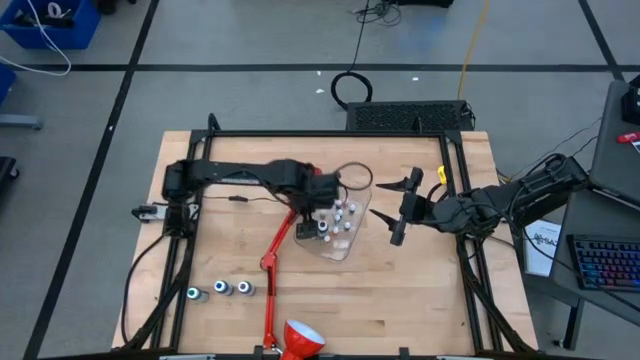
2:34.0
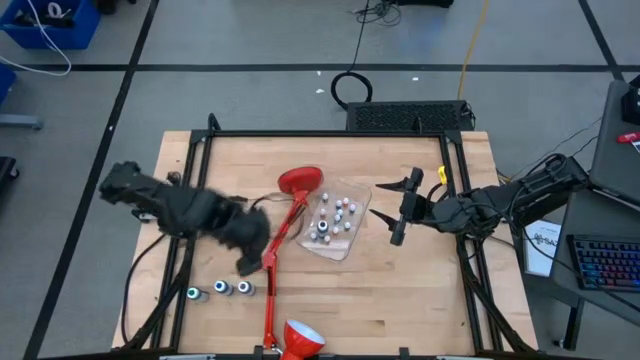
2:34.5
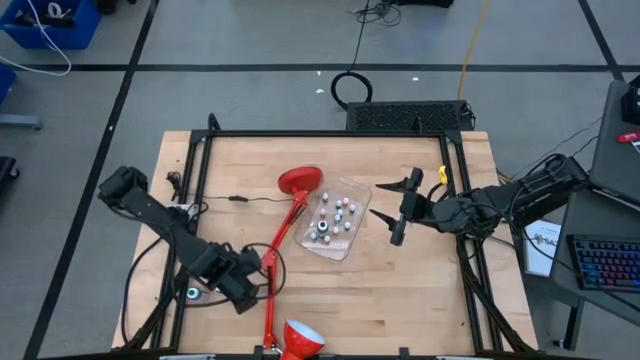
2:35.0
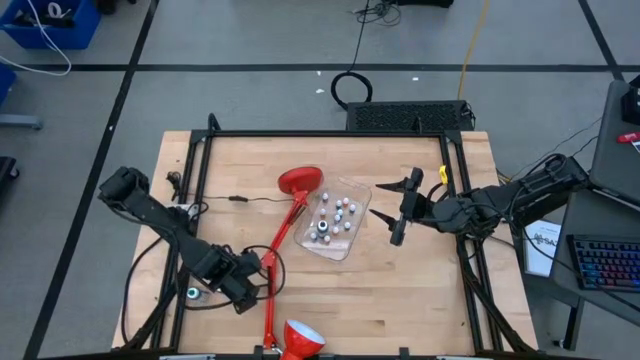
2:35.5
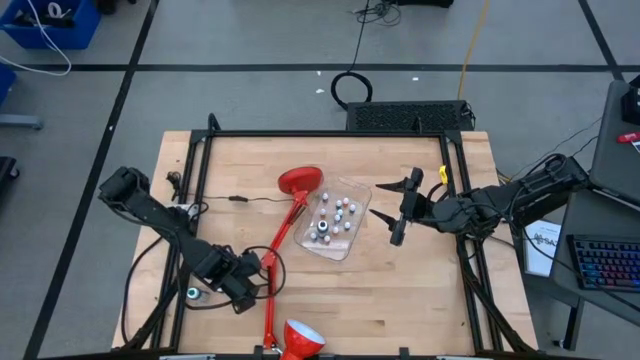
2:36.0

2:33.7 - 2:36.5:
Task: Pick & Place food coloring
Put the large purple food coloring bottle into the transparent bin

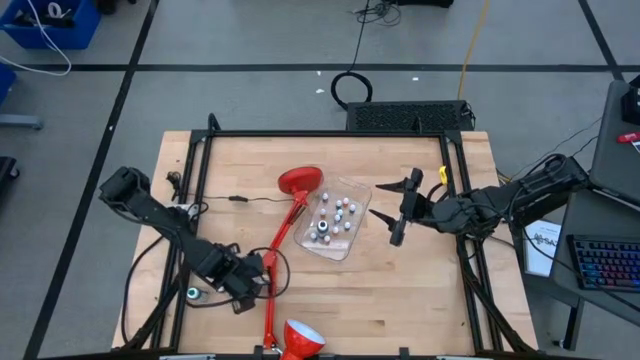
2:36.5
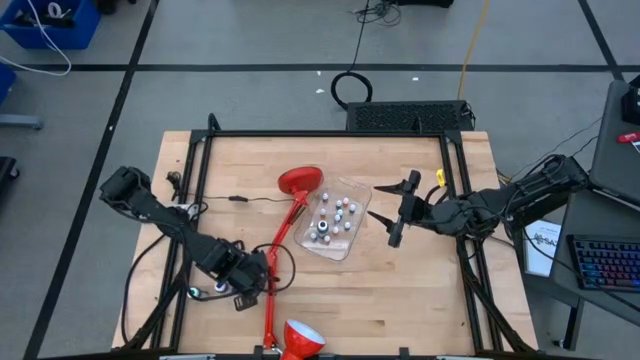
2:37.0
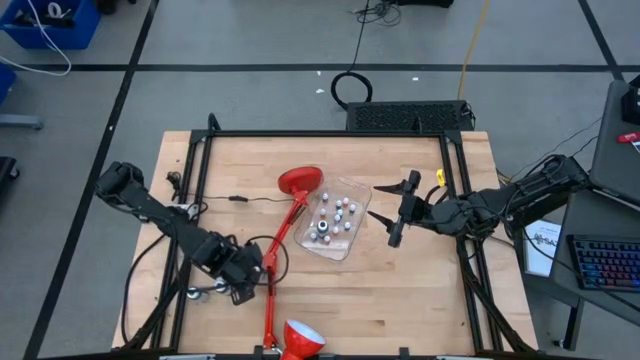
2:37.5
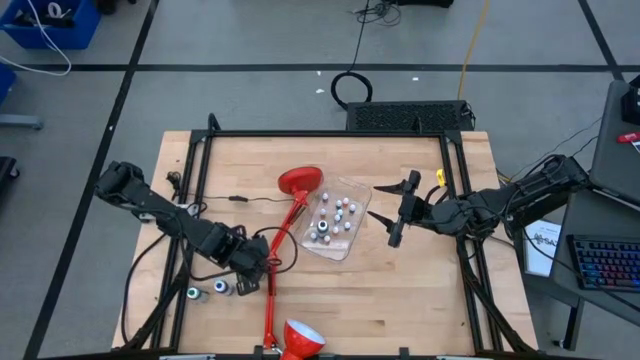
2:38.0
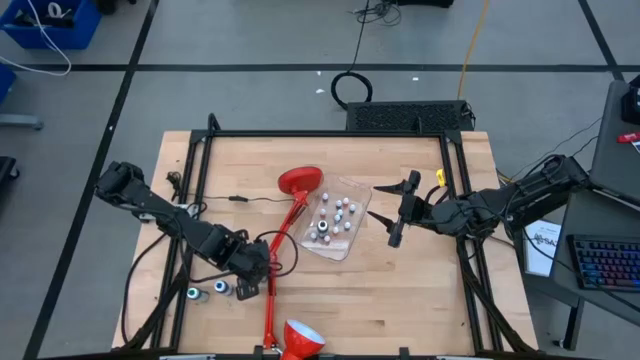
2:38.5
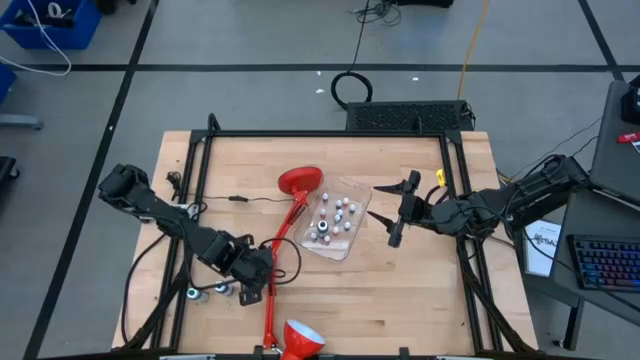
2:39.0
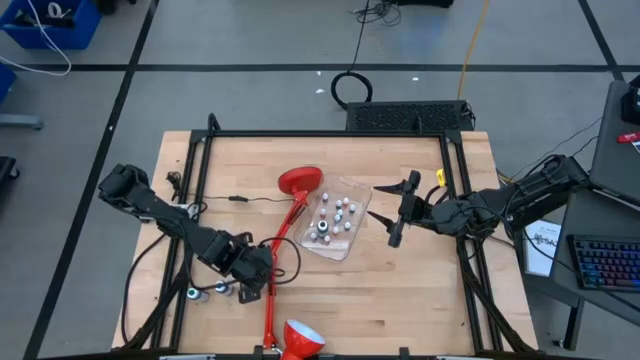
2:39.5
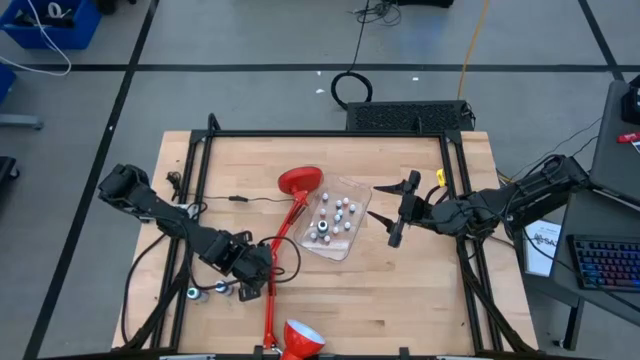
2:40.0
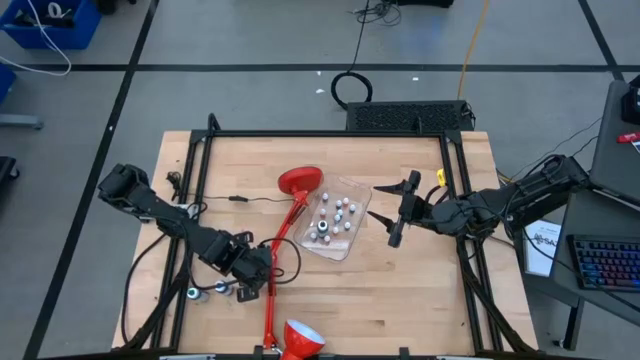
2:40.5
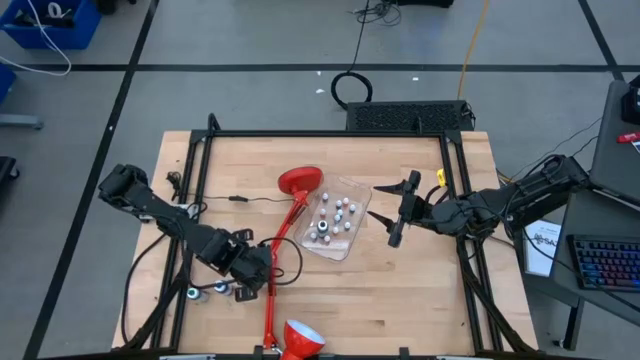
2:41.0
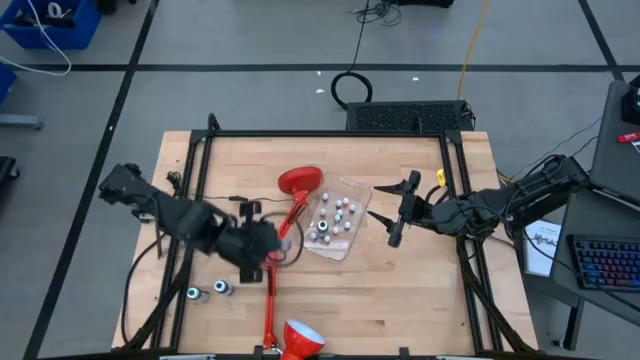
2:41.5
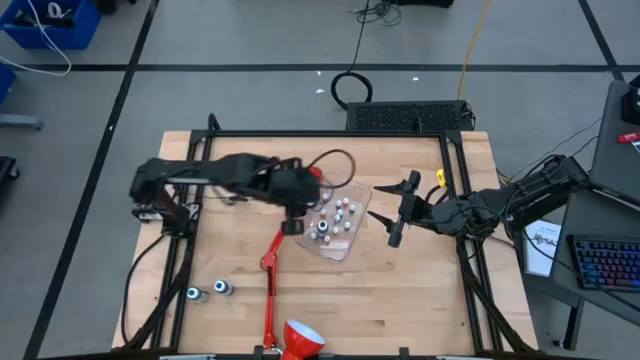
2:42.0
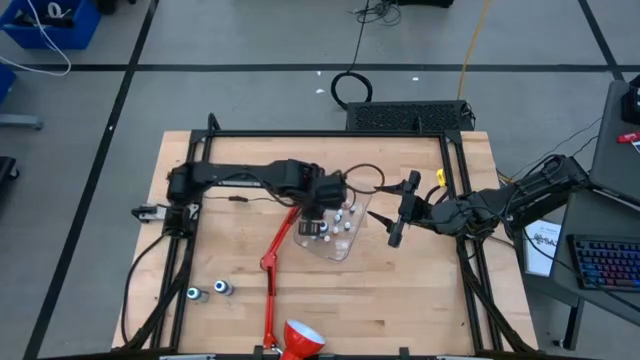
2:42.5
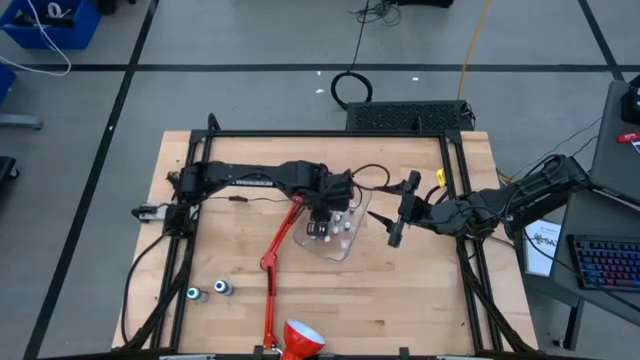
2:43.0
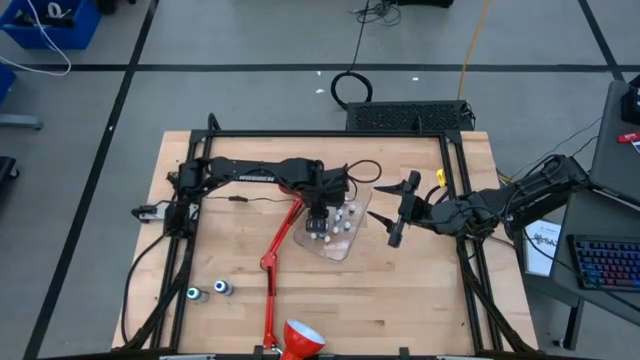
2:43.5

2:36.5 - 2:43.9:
Put the large purple food coloring bottle into the transparent bin

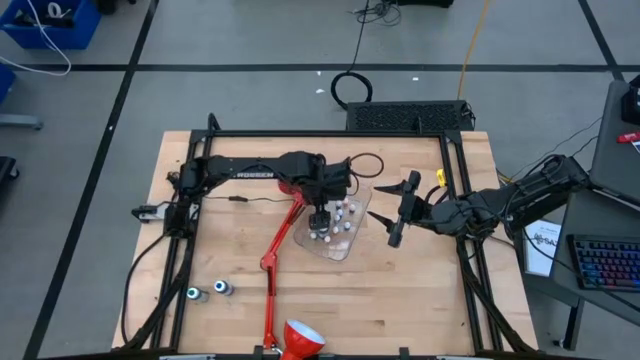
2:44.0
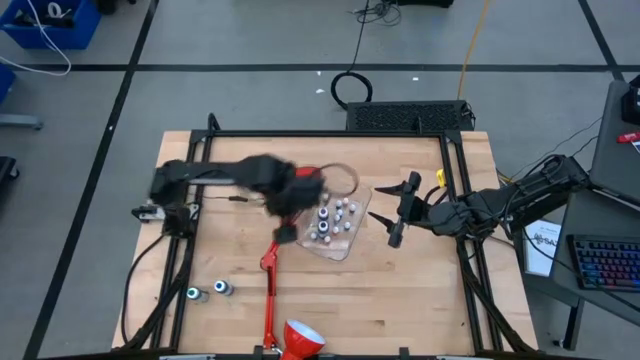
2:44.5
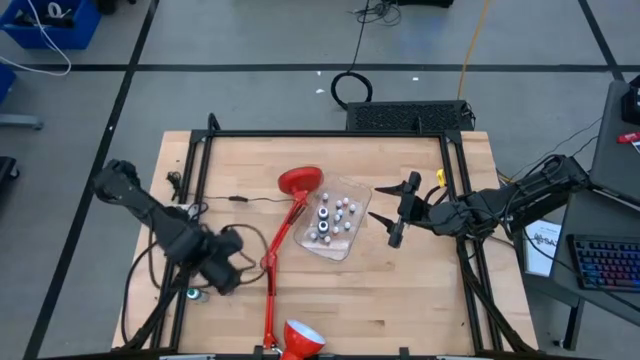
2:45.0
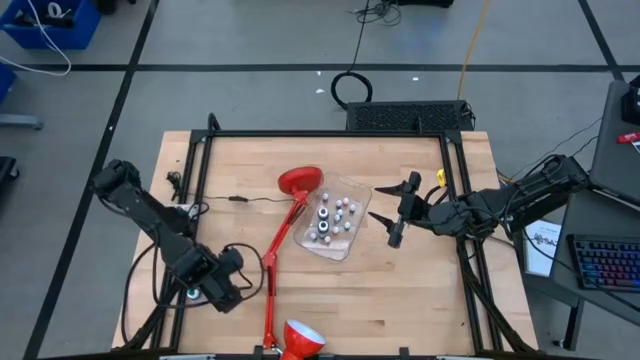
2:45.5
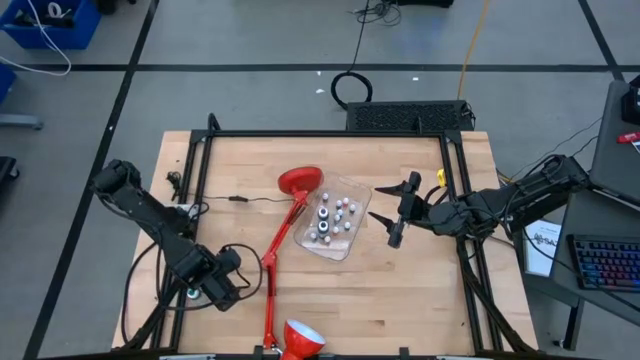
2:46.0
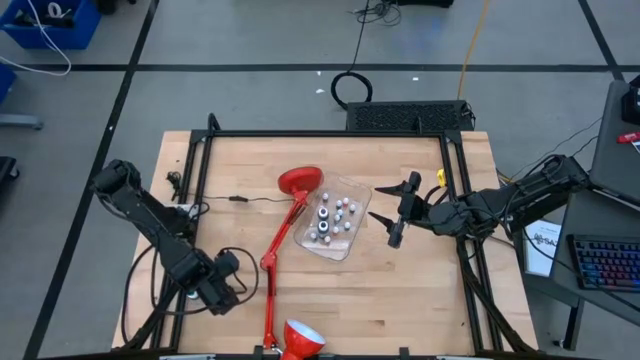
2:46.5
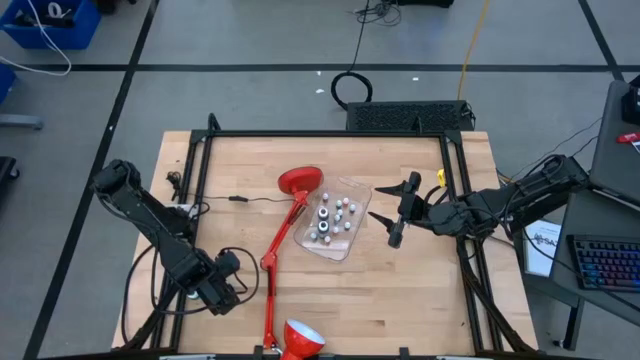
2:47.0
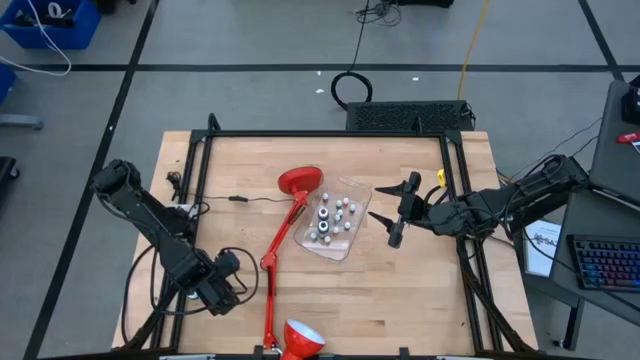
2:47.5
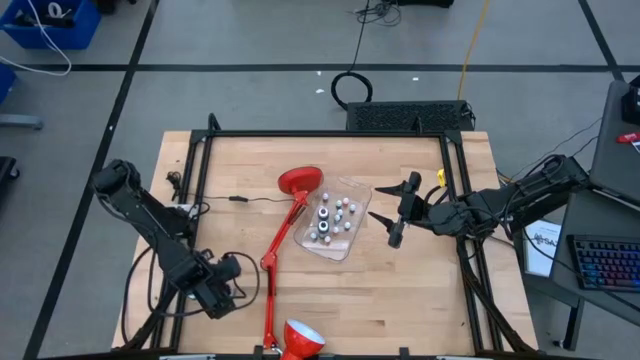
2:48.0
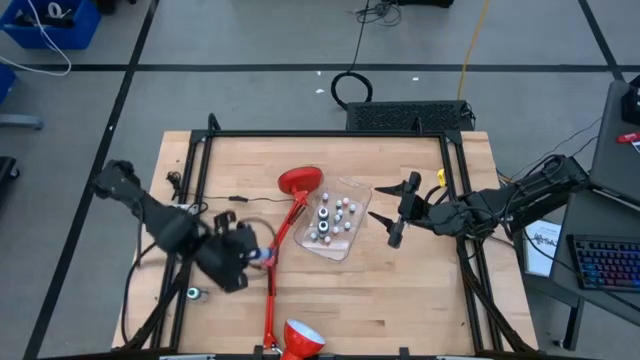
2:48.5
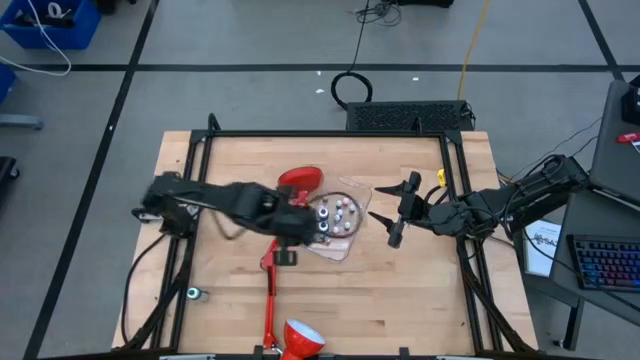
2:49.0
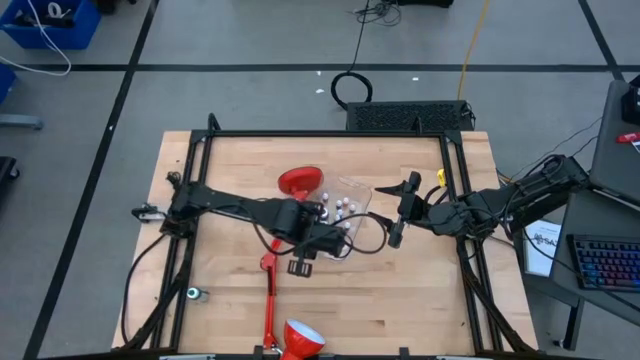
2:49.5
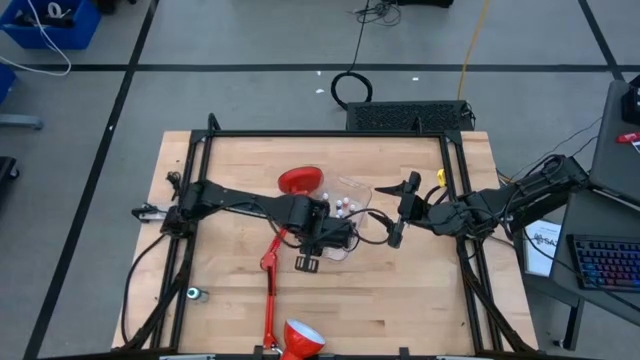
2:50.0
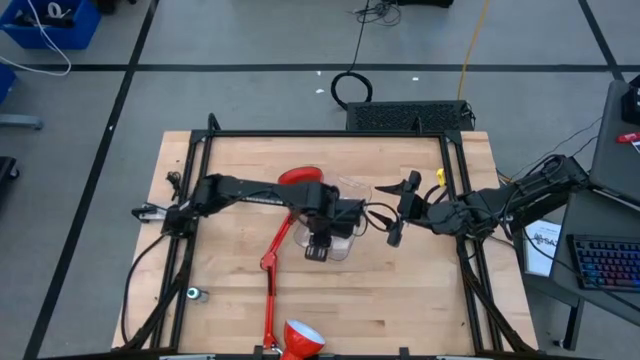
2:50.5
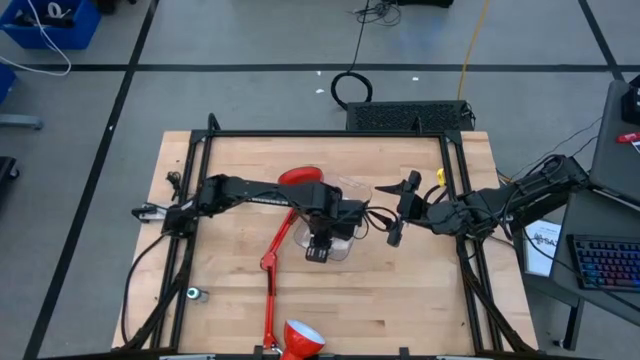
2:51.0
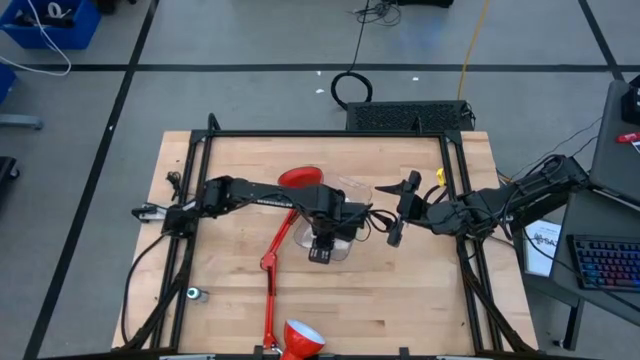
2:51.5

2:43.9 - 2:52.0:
Put the large blue food coloring bottle into the transparent bin
